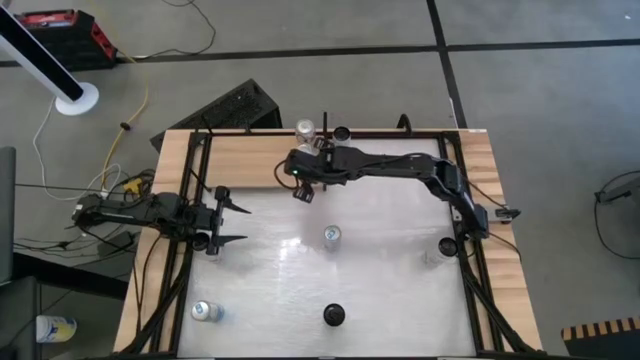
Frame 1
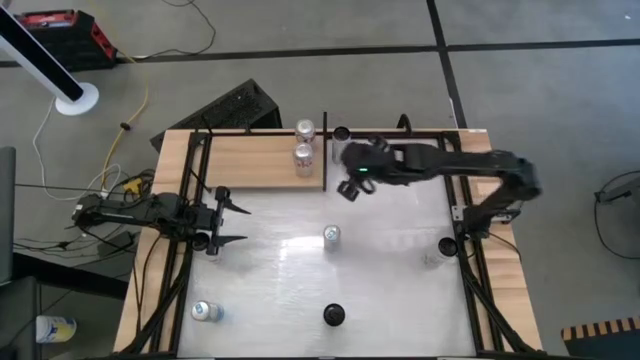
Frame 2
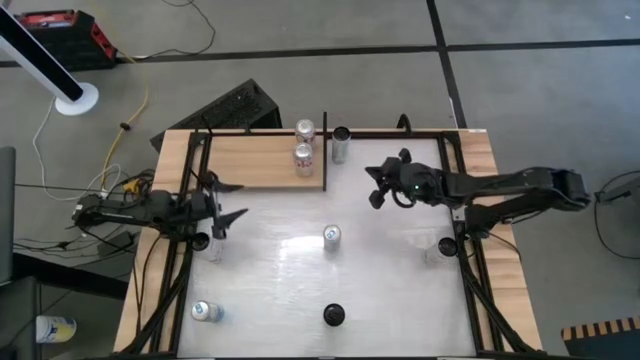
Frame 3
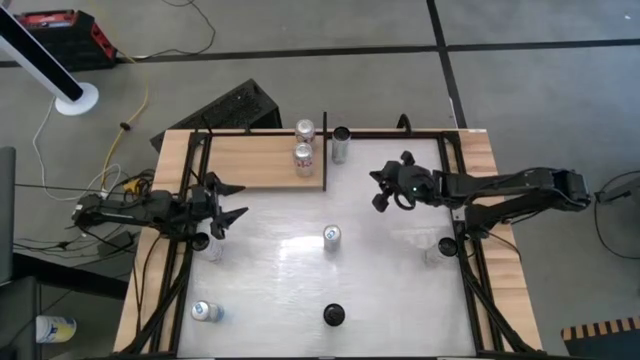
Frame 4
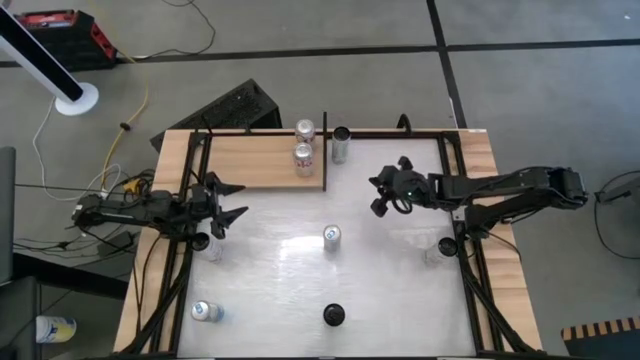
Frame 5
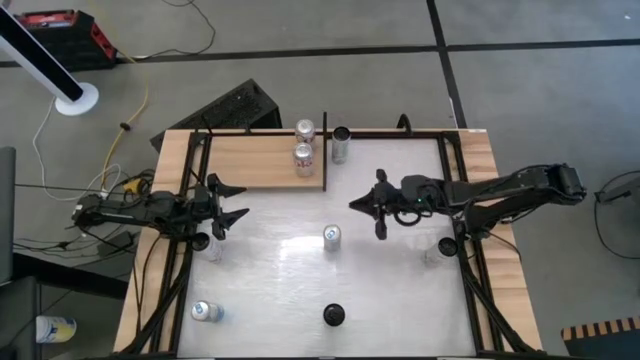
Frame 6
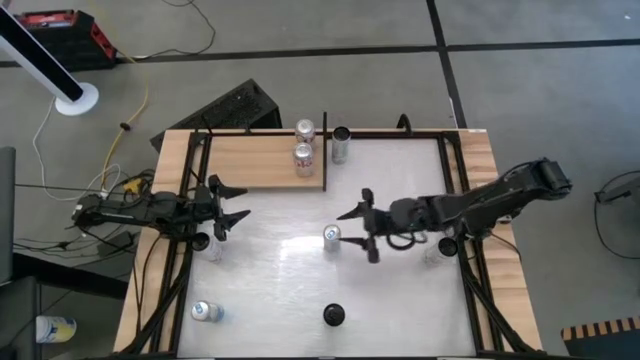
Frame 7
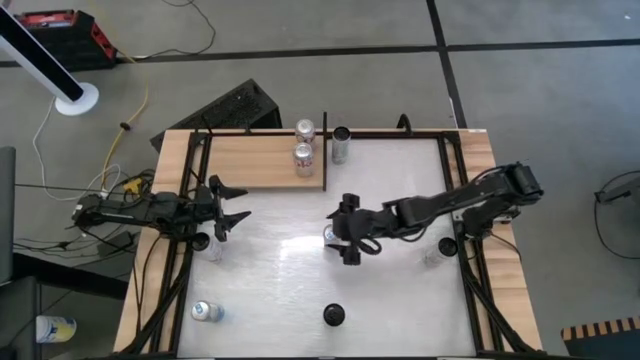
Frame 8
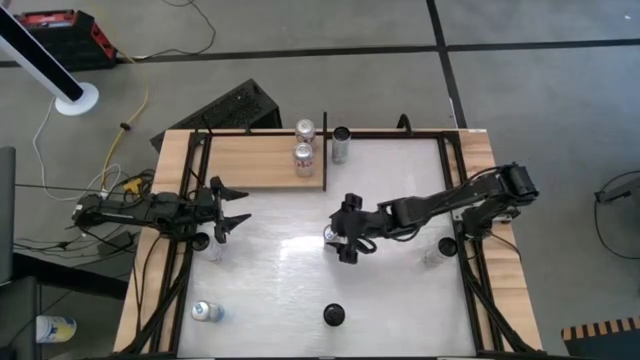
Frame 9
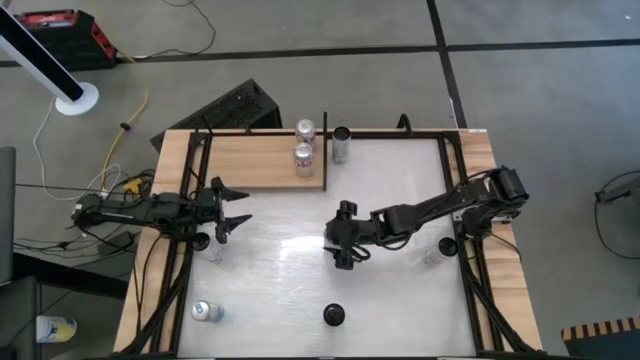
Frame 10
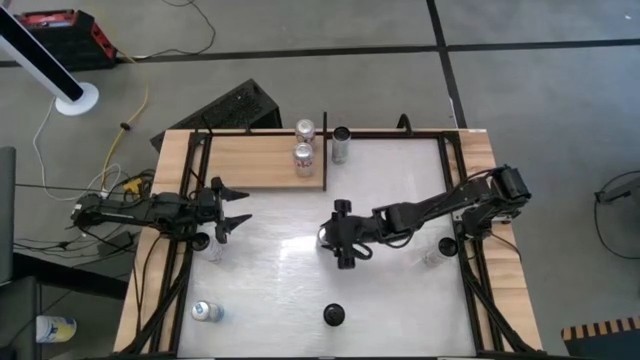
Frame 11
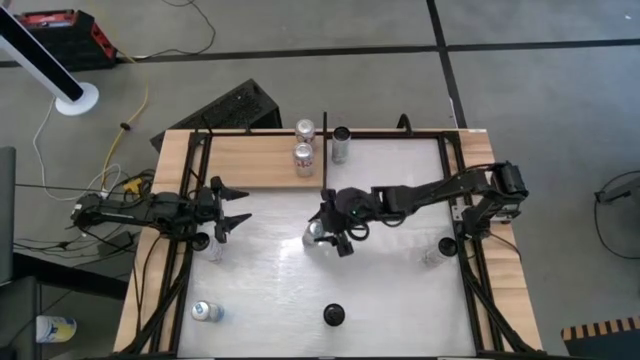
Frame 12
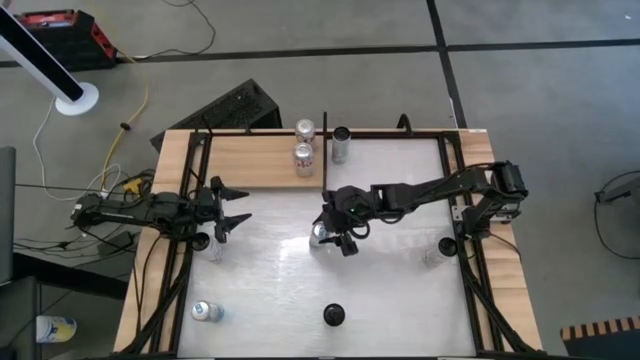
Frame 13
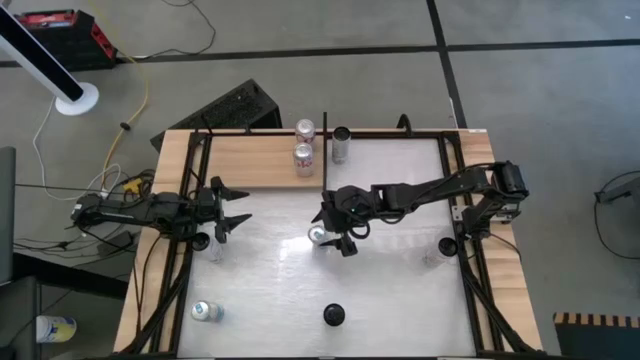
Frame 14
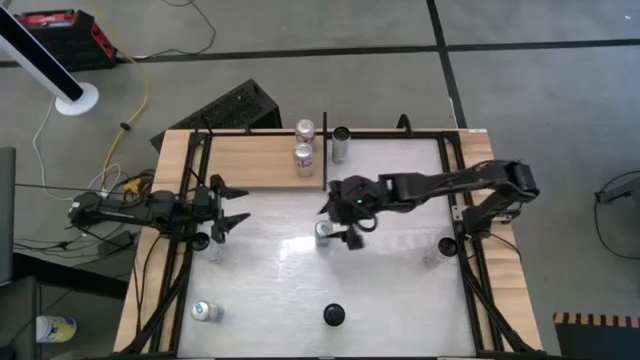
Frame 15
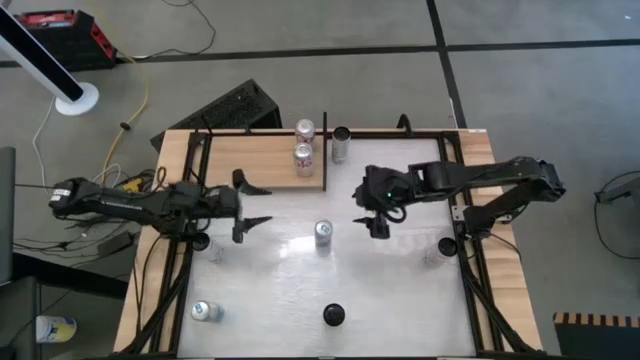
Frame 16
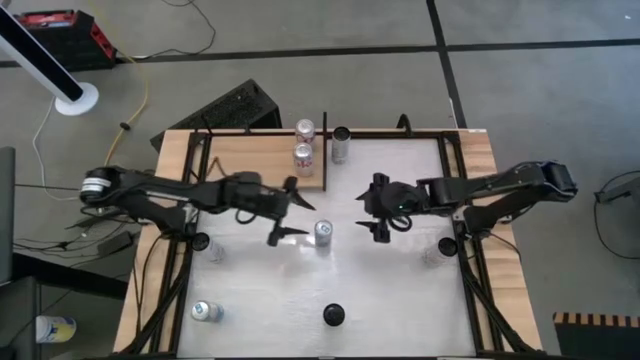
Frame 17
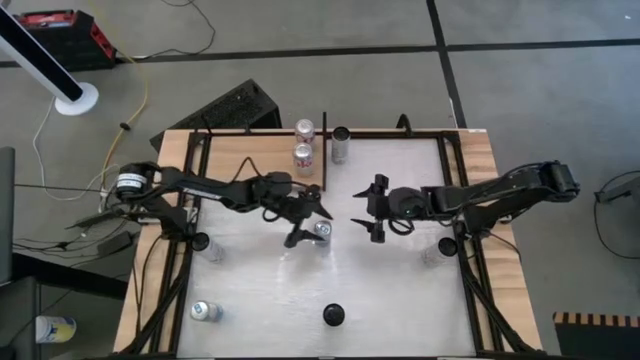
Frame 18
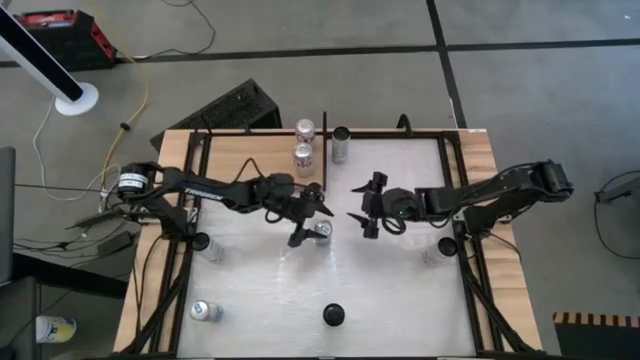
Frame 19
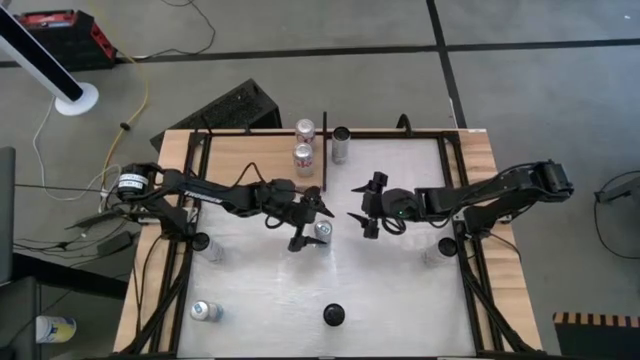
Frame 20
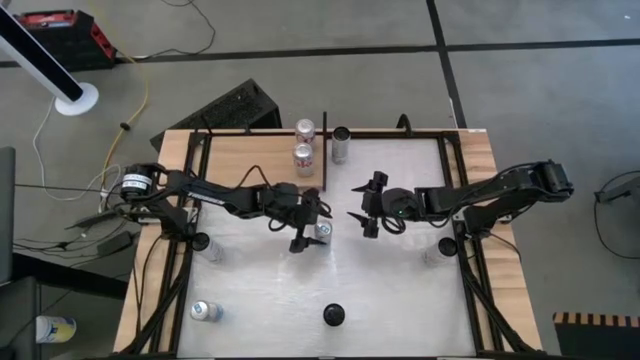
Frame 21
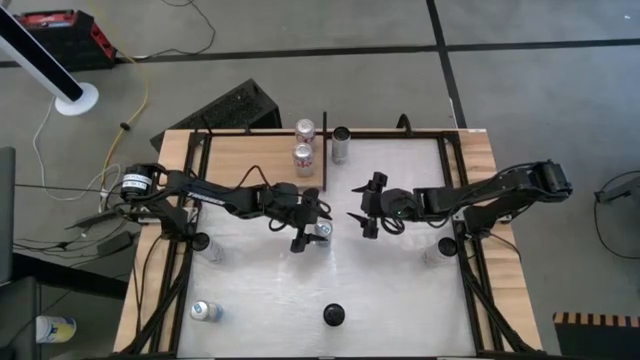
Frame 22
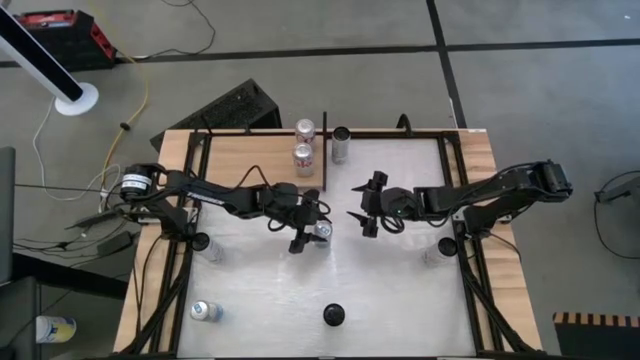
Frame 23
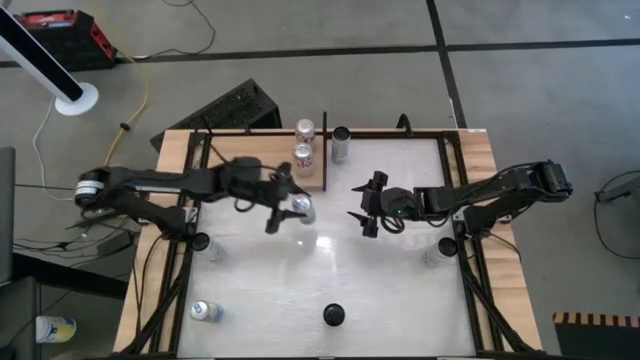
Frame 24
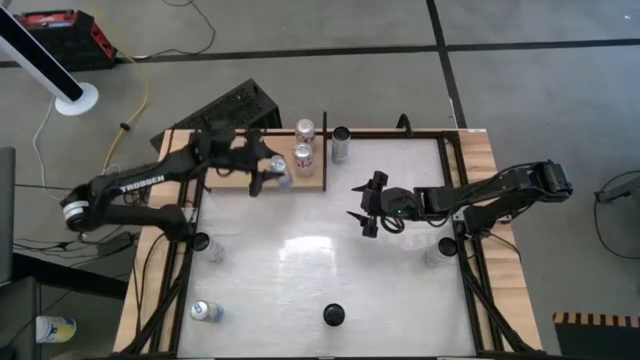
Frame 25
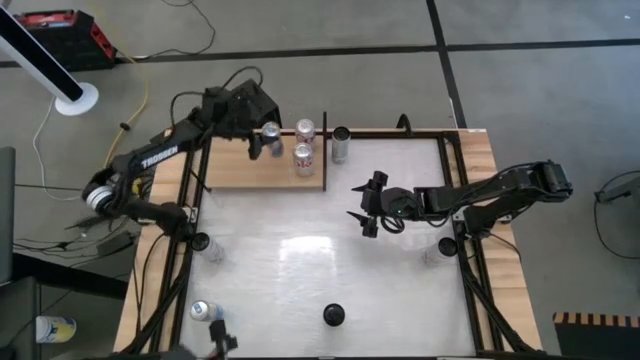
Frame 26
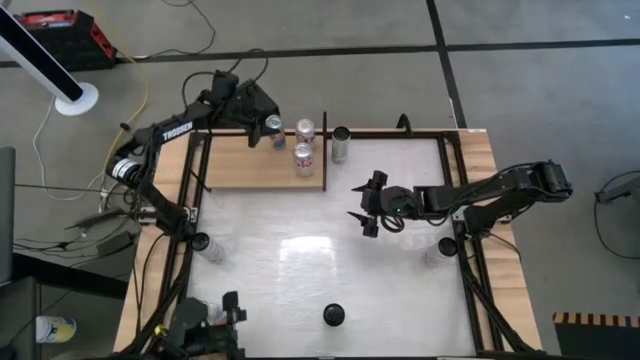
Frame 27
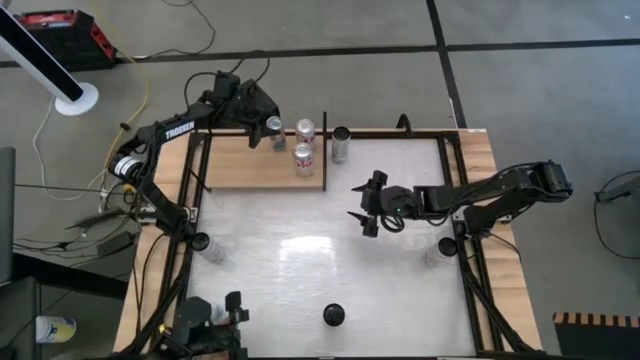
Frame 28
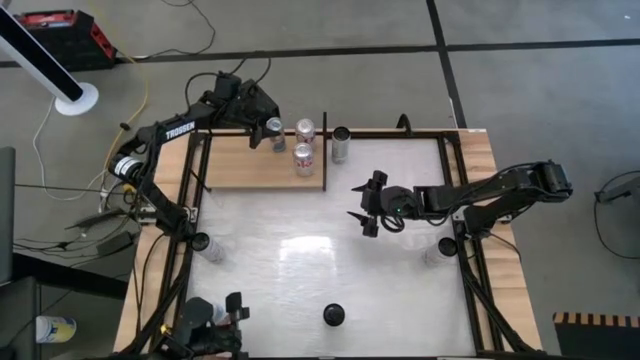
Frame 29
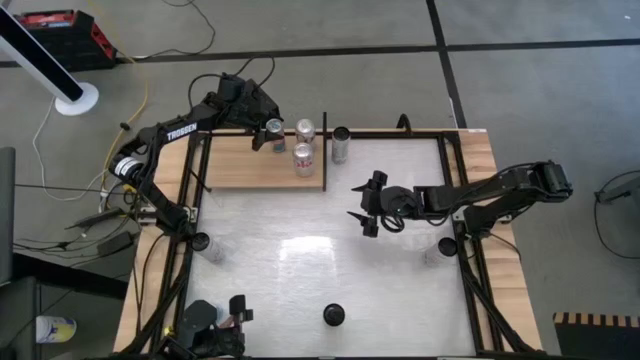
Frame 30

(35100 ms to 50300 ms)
Task: Place canned beverage on shelf
Put the top blue soda can on the shelf

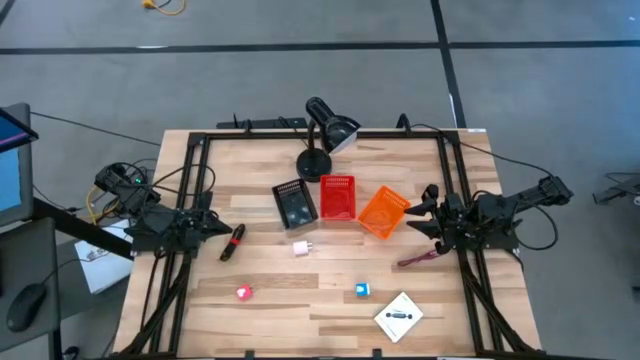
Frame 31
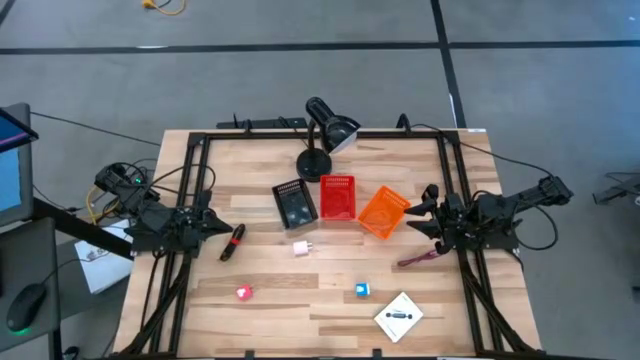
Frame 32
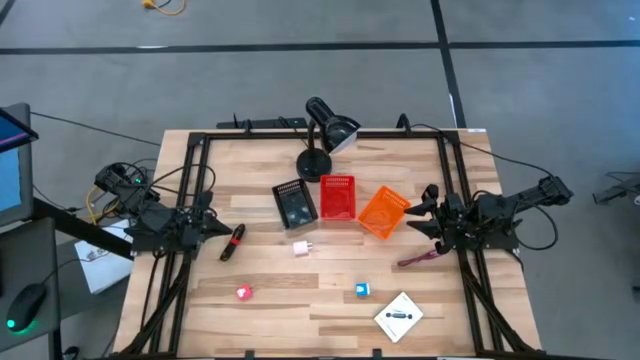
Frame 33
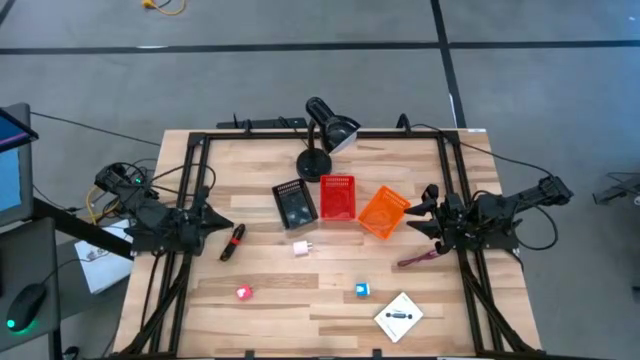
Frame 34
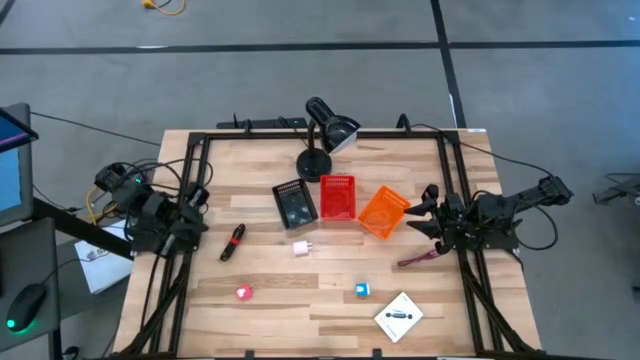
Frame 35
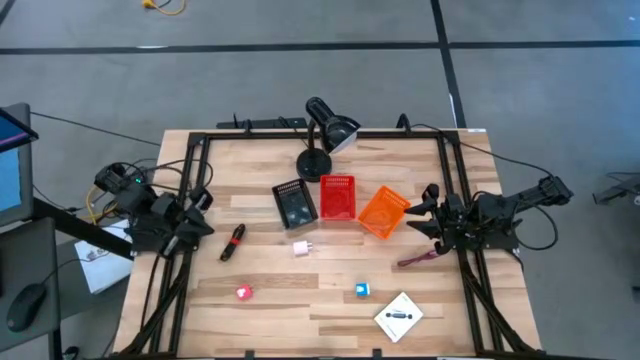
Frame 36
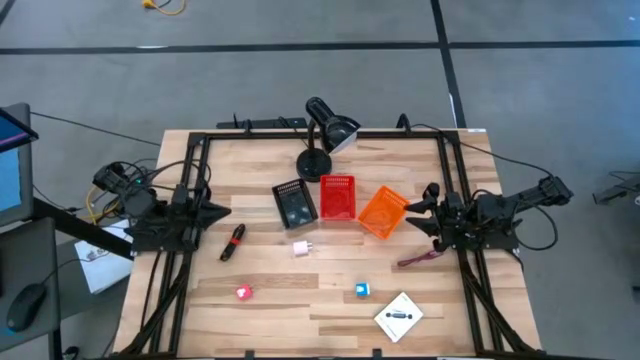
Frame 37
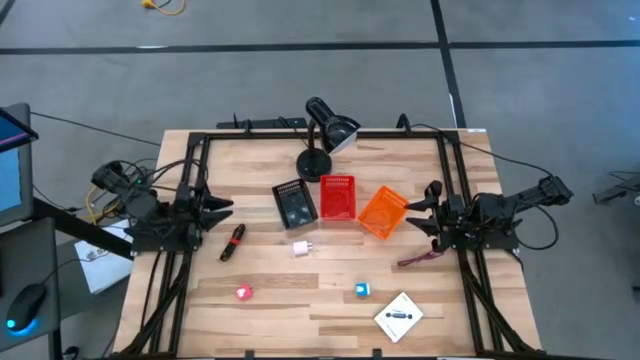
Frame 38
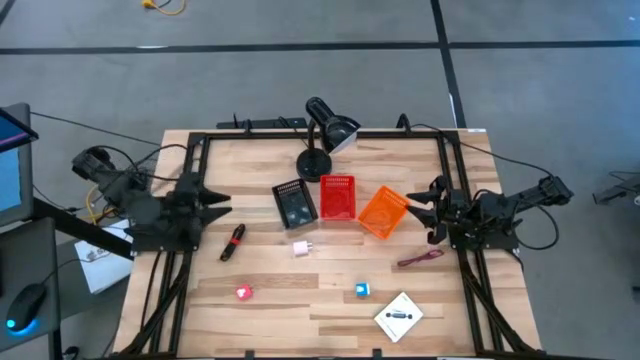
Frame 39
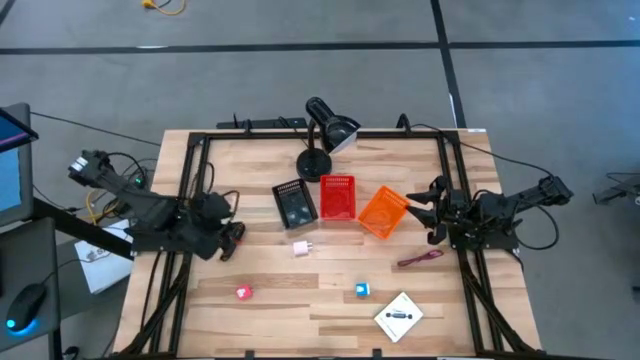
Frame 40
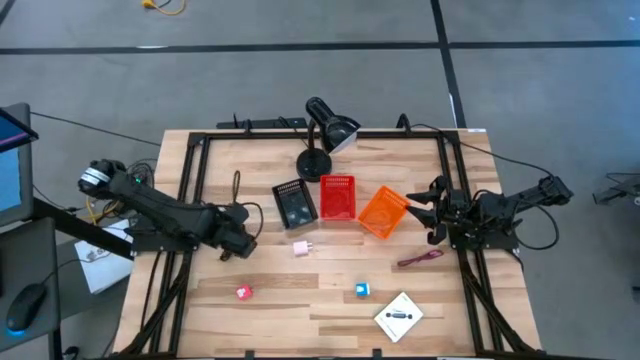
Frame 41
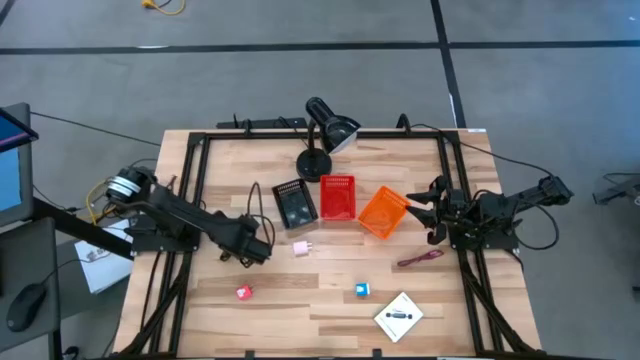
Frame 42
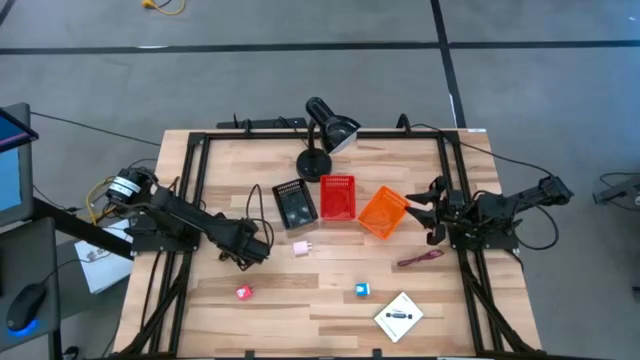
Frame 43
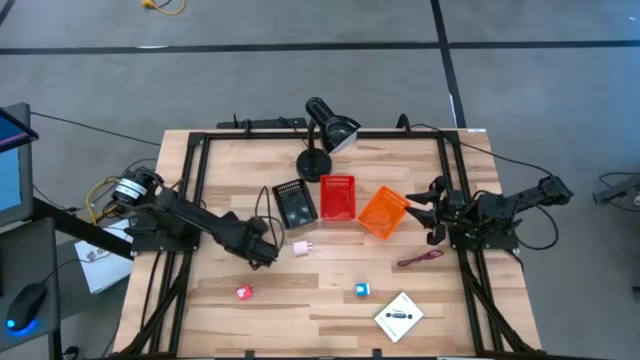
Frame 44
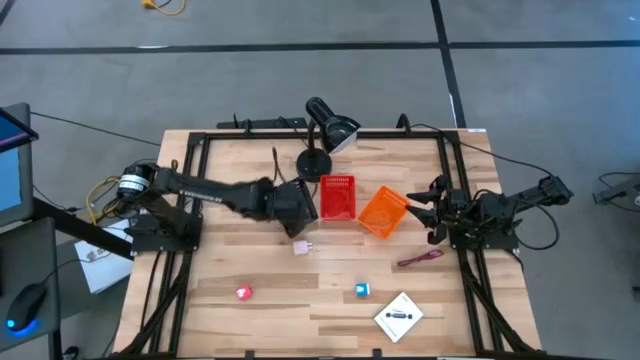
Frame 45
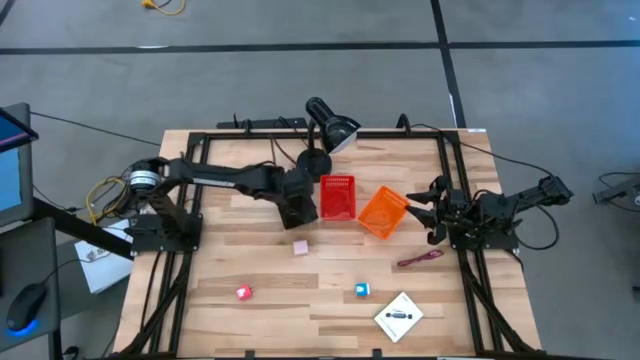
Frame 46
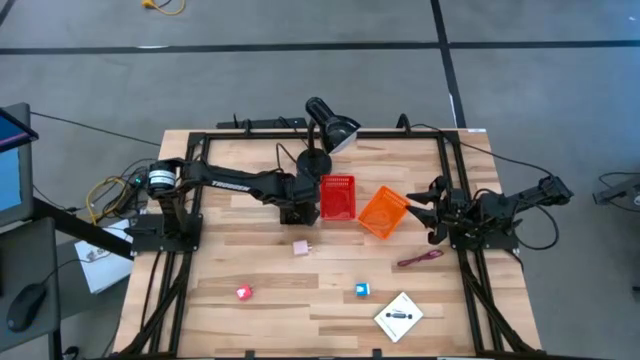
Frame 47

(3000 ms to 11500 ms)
Task: Pick and place items into bin
Put the black USB cable into the black bin
